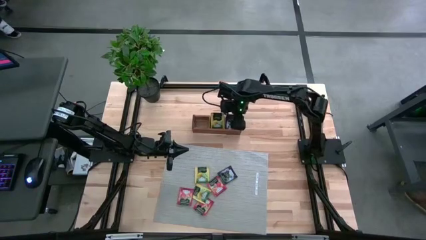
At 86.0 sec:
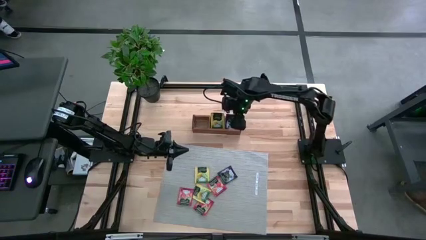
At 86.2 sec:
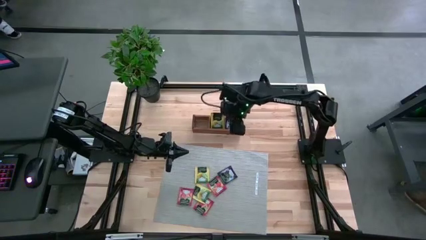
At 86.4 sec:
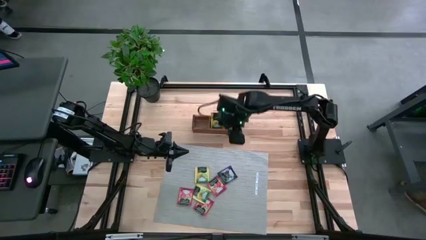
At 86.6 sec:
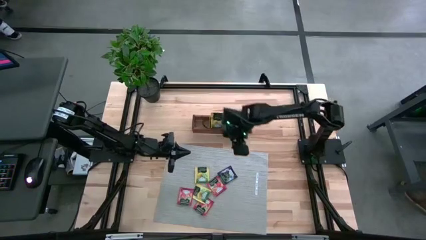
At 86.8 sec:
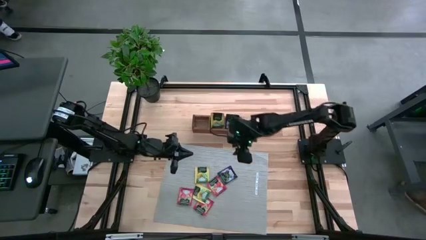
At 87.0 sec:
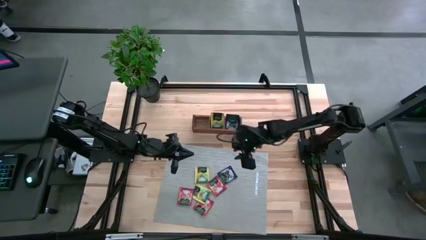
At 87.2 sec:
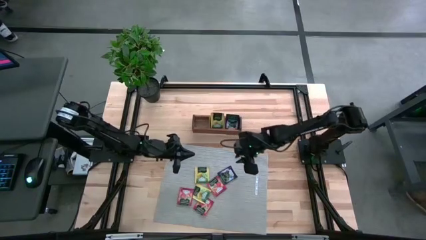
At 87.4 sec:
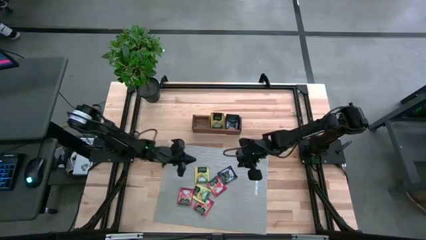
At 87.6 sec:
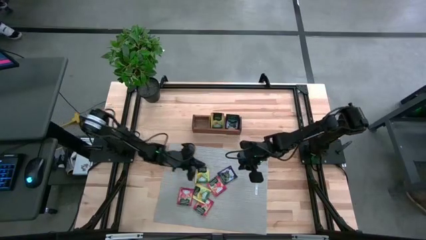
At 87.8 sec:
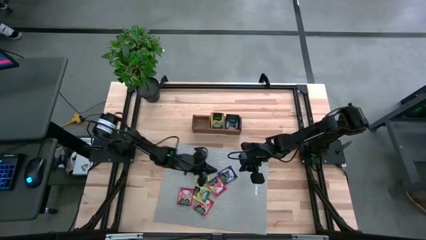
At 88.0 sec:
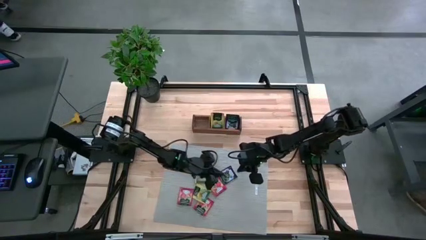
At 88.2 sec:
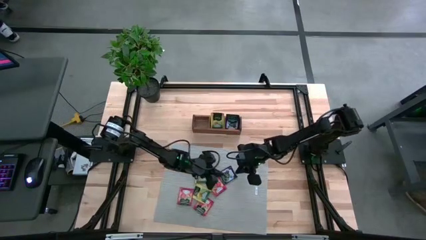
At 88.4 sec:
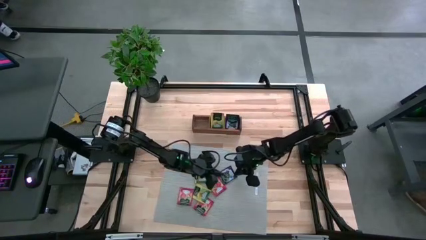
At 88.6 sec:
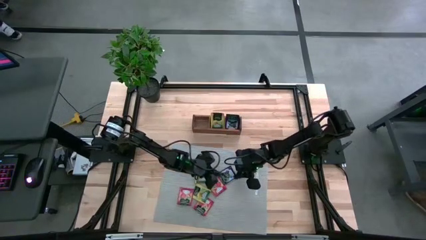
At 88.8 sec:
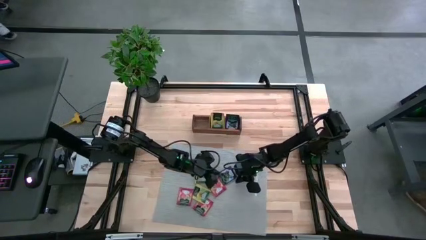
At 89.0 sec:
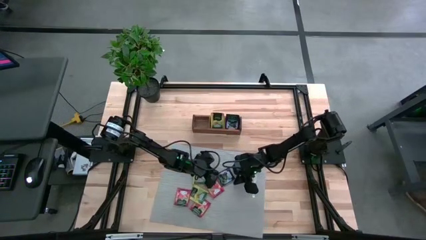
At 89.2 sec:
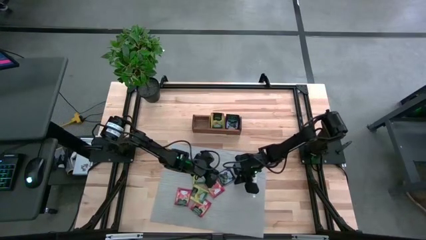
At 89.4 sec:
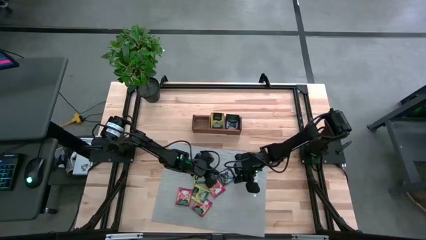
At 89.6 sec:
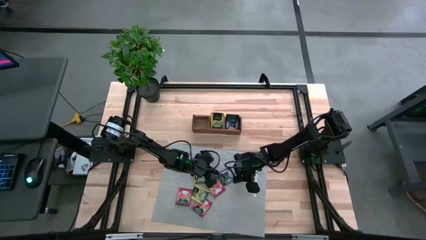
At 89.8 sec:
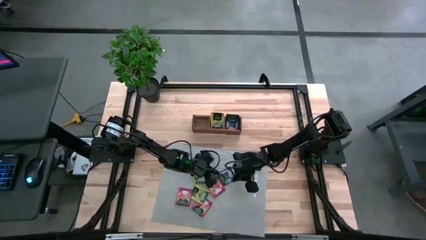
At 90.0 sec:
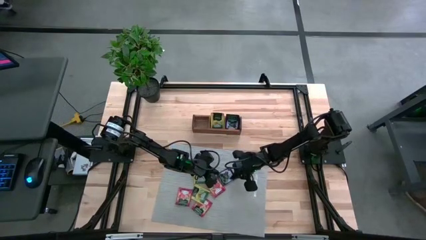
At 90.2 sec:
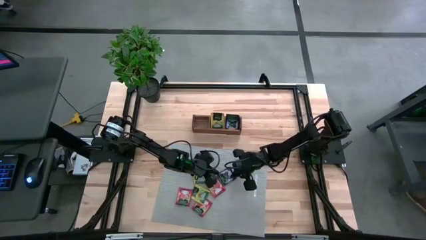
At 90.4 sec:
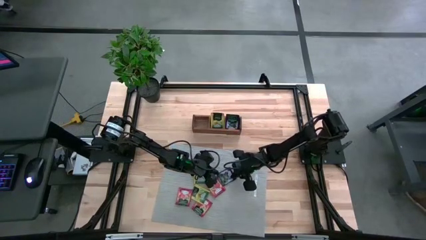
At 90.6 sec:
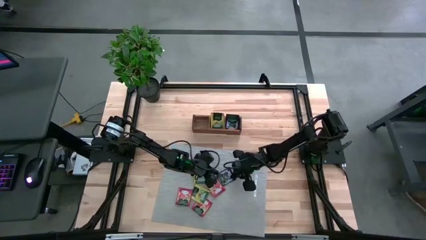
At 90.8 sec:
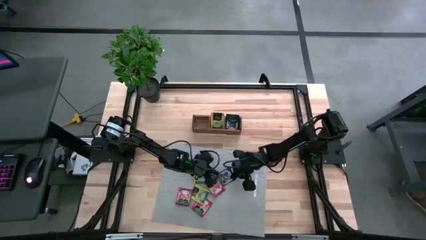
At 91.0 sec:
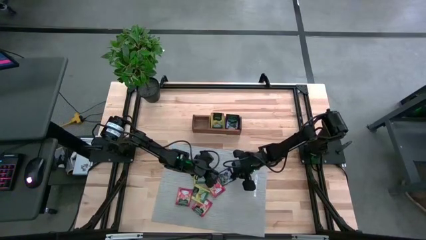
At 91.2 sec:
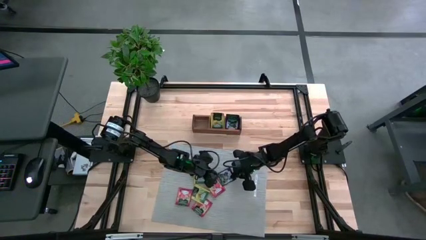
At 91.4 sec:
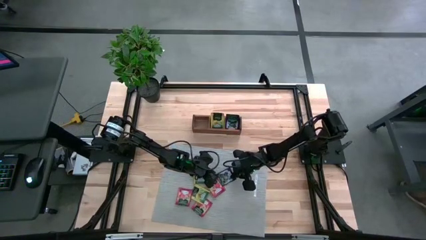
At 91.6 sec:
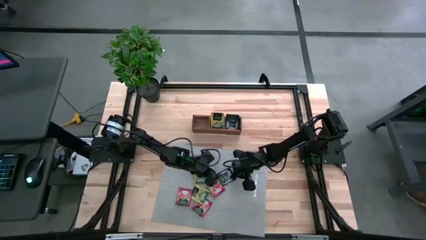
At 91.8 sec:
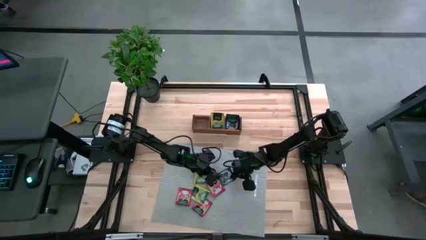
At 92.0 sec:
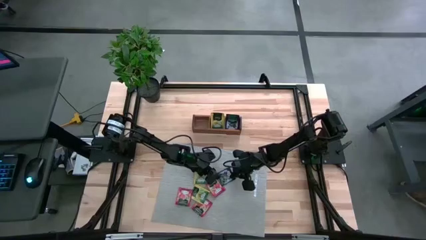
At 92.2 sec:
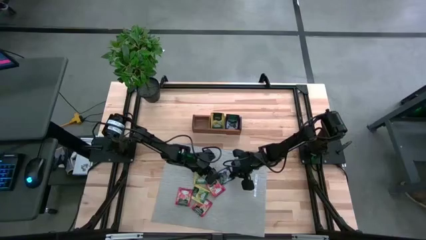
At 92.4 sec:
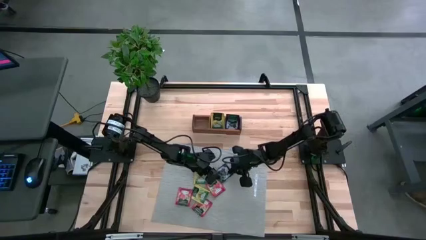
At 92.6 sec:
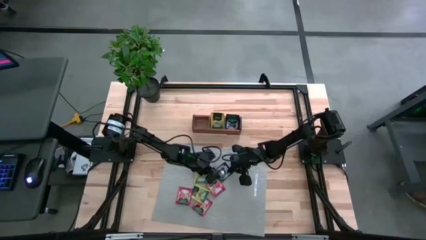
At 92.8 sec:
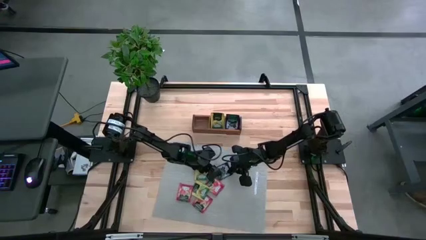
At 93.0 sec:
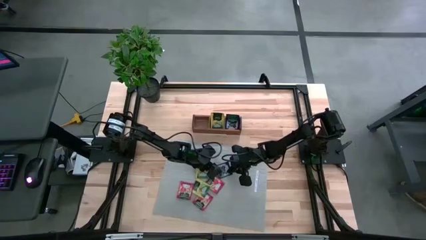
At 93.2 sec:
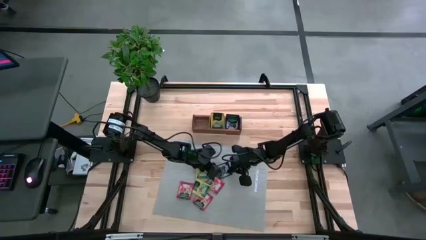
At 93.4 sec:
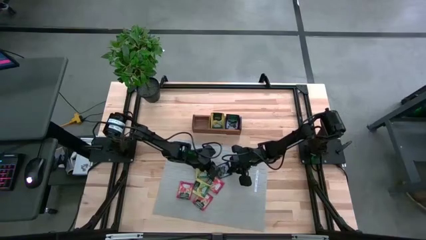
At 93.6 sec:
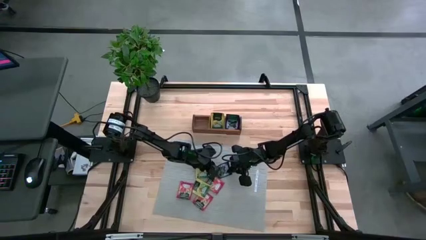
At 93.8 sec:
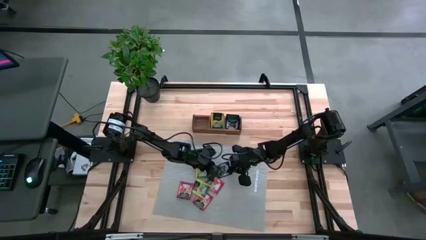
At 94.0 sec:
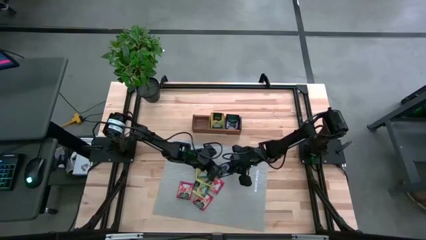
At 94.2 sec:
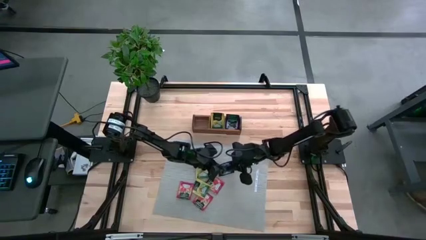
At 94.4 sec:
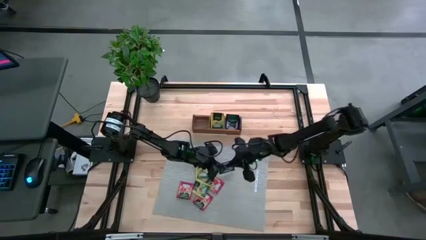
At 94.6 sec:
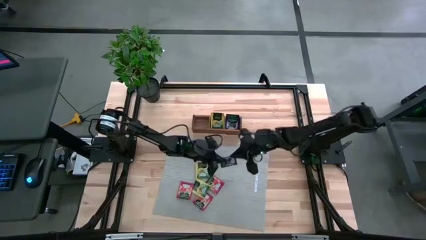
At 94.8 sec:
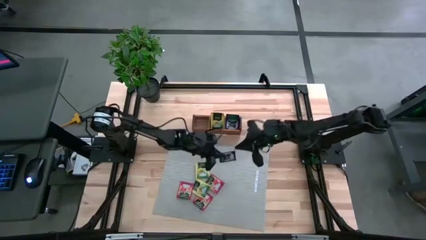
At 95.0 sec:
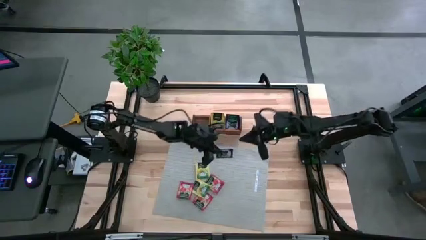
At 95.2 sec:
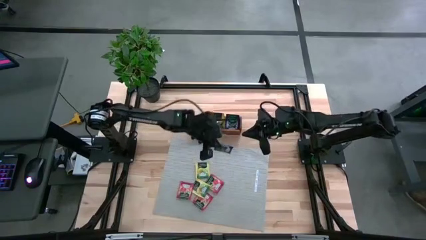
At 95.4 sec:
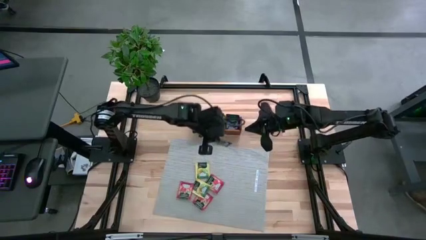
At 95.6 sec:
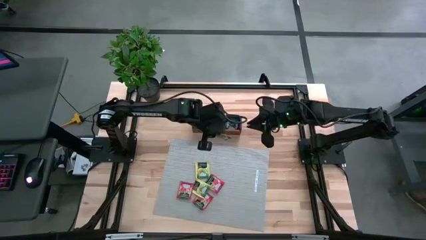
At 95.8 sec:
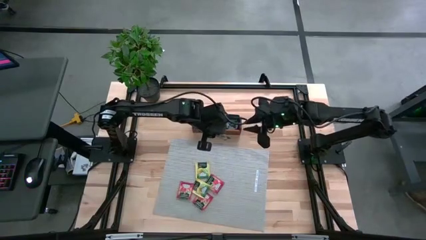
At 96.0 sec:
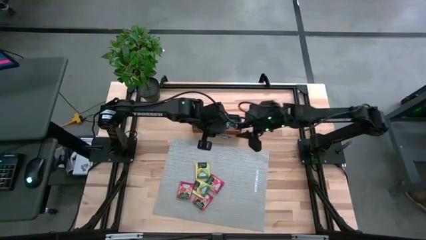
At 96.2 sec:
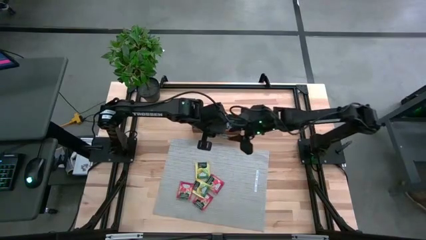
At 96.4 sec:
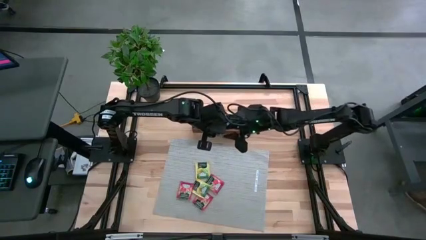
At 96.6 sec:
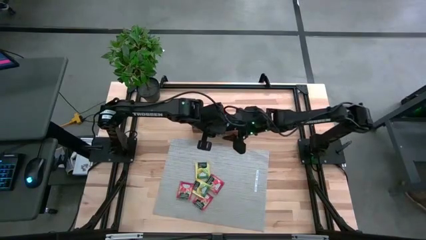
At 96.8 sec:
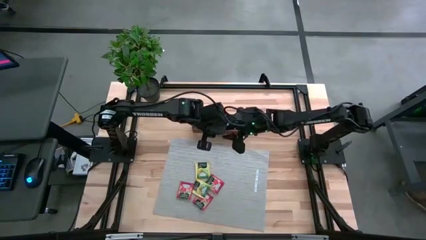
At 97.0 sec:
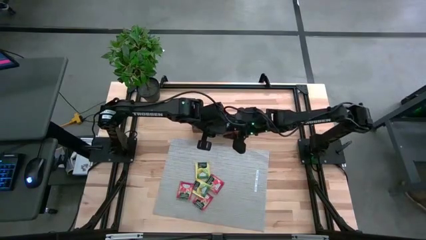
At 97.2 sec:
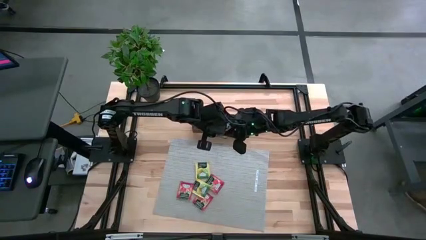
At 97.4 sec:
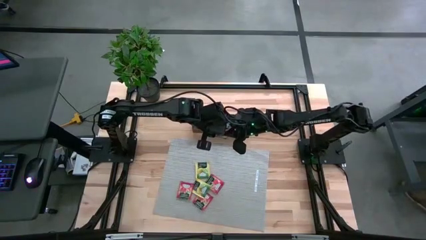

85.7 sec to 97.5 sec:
Task: Pick & Place Tea
Put the violet tea bag into the right section of the wooden organizer
